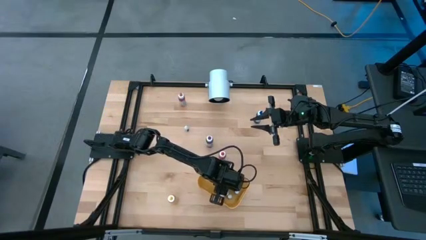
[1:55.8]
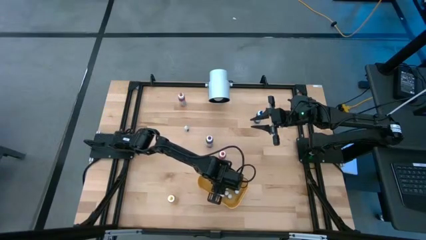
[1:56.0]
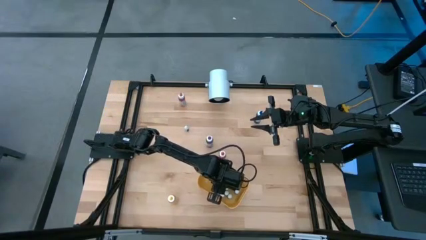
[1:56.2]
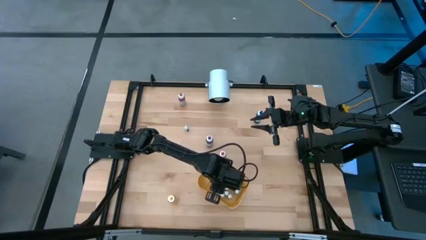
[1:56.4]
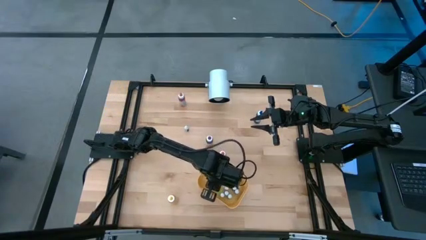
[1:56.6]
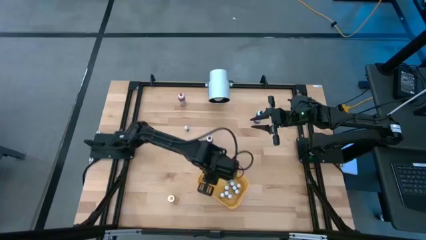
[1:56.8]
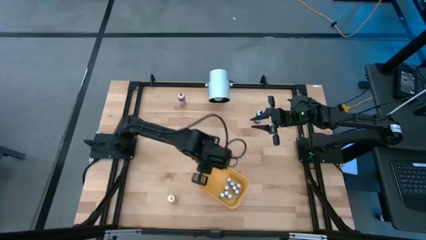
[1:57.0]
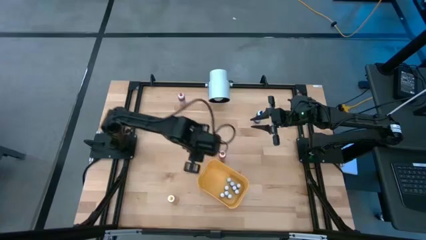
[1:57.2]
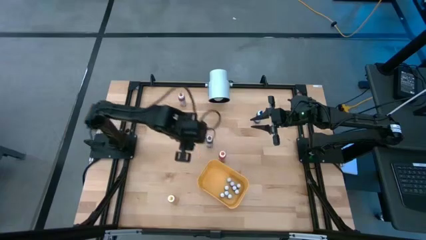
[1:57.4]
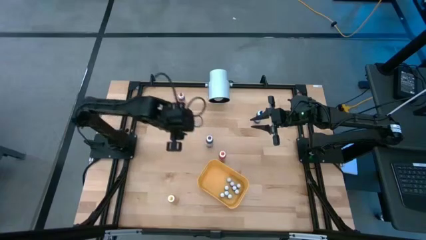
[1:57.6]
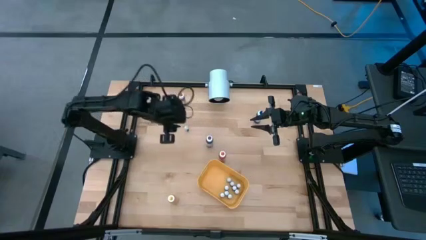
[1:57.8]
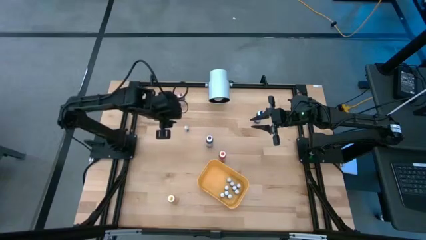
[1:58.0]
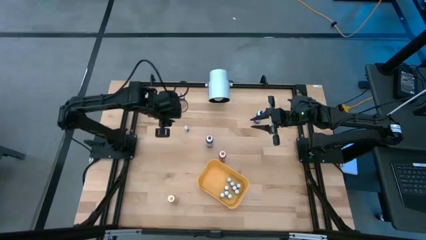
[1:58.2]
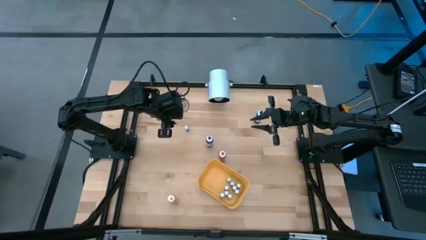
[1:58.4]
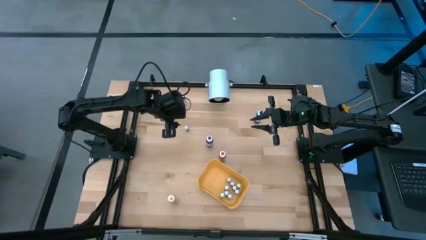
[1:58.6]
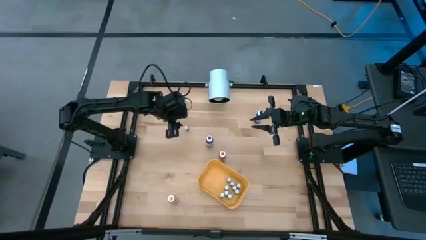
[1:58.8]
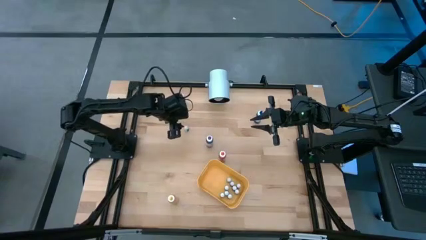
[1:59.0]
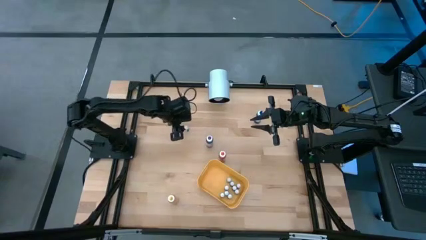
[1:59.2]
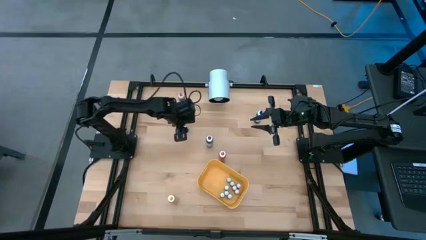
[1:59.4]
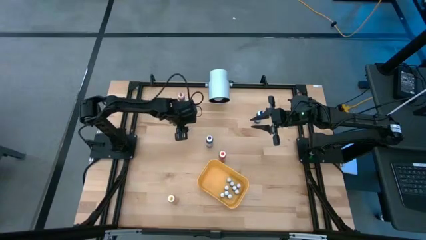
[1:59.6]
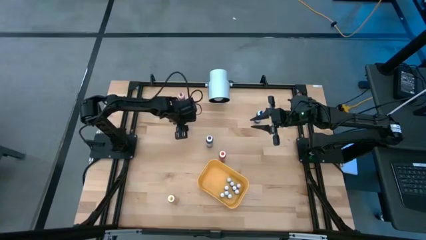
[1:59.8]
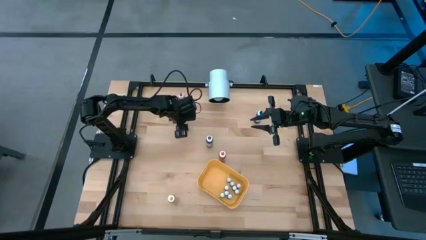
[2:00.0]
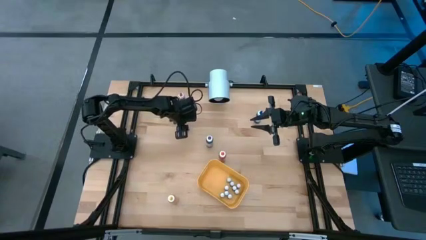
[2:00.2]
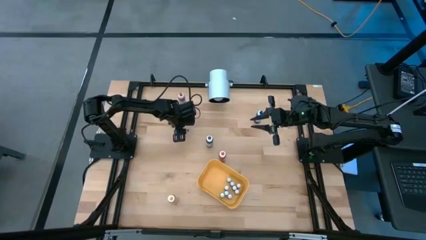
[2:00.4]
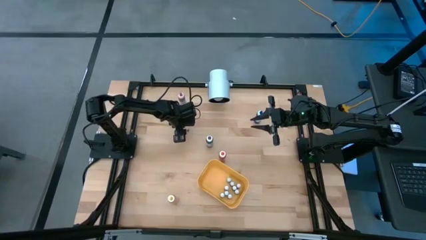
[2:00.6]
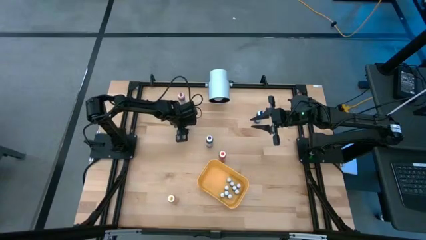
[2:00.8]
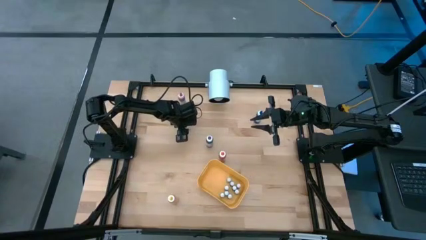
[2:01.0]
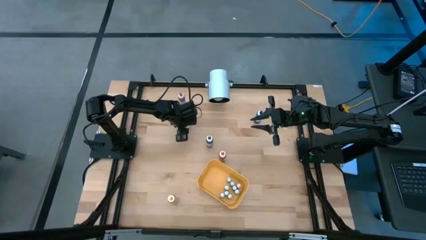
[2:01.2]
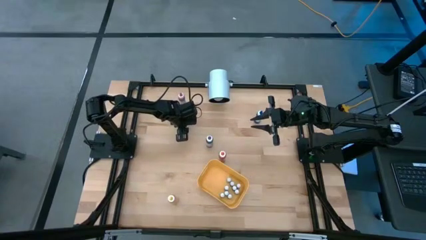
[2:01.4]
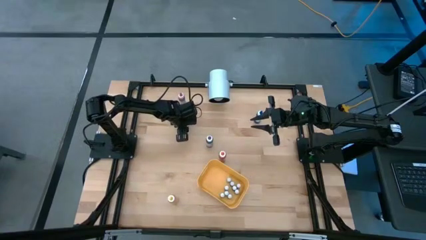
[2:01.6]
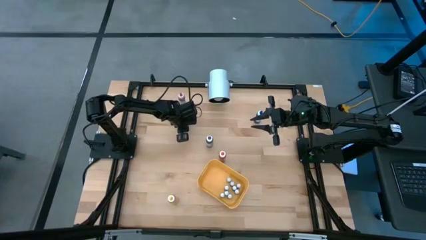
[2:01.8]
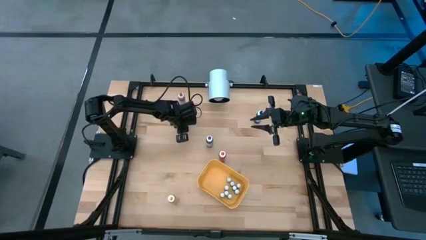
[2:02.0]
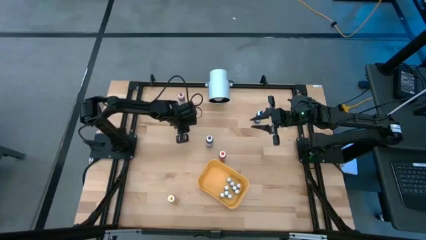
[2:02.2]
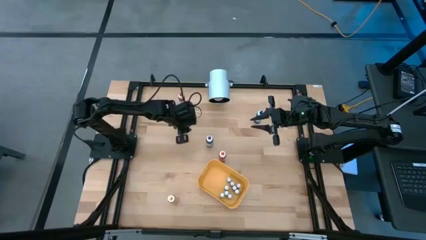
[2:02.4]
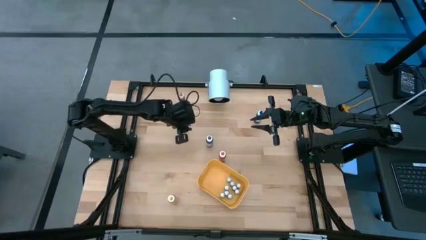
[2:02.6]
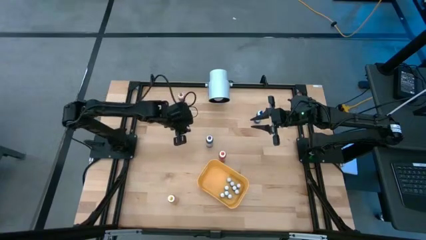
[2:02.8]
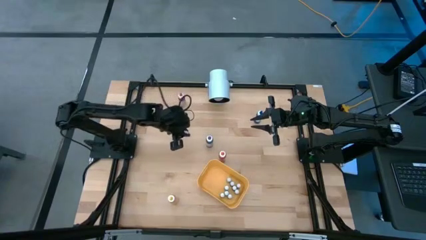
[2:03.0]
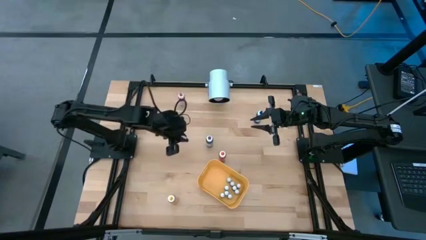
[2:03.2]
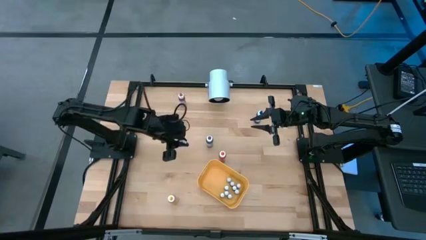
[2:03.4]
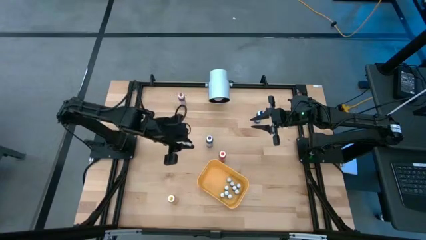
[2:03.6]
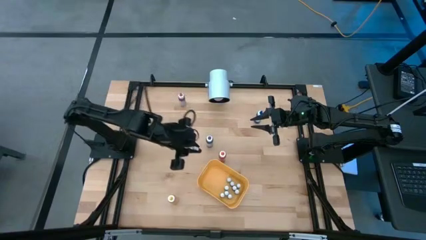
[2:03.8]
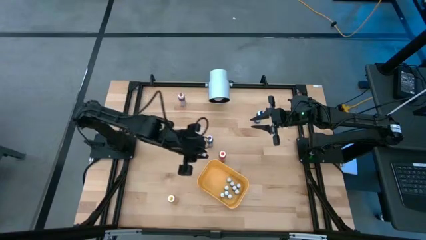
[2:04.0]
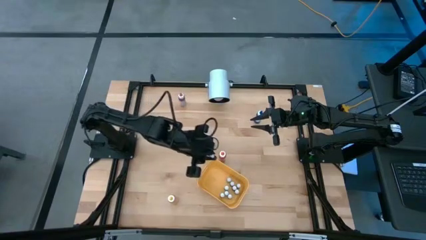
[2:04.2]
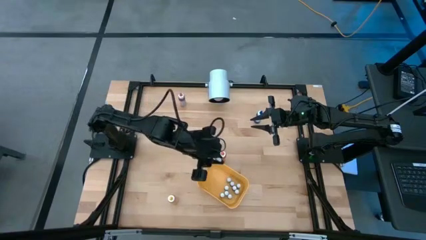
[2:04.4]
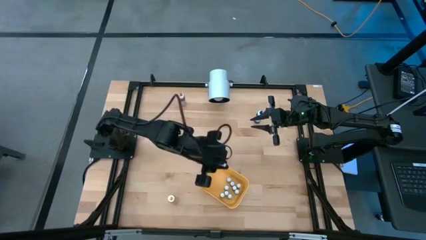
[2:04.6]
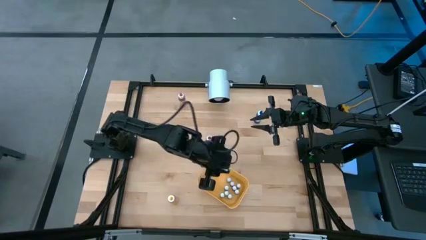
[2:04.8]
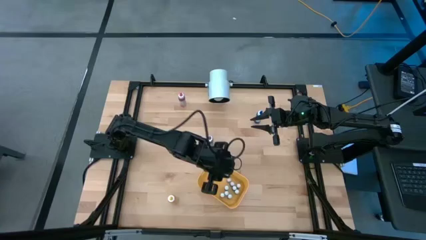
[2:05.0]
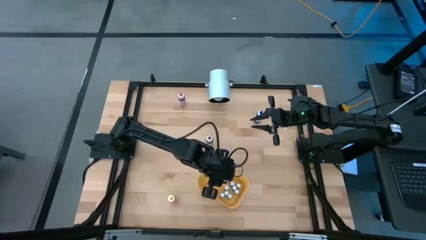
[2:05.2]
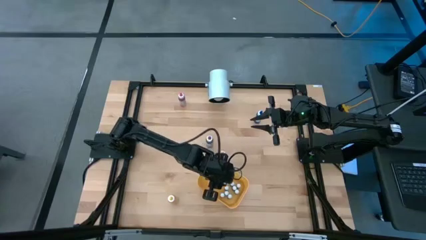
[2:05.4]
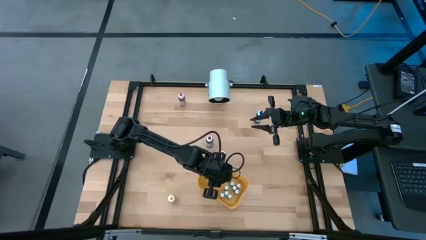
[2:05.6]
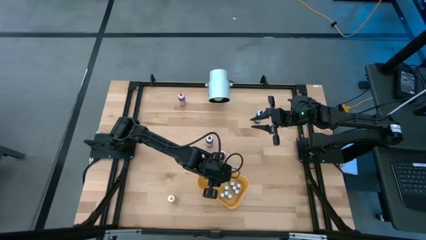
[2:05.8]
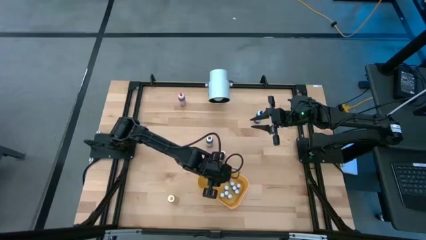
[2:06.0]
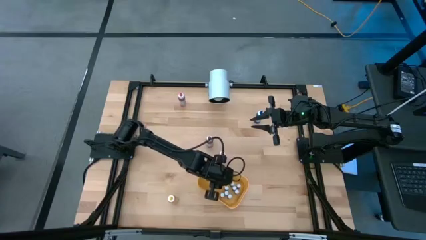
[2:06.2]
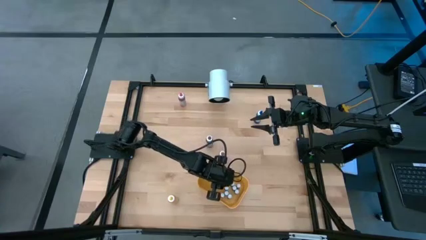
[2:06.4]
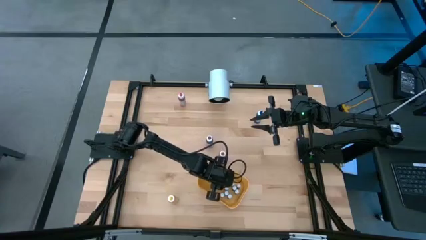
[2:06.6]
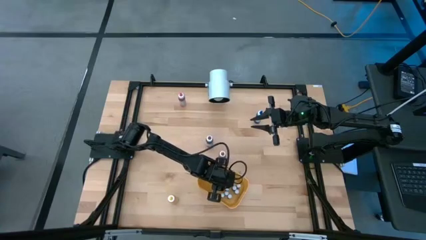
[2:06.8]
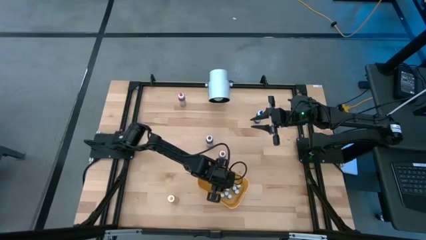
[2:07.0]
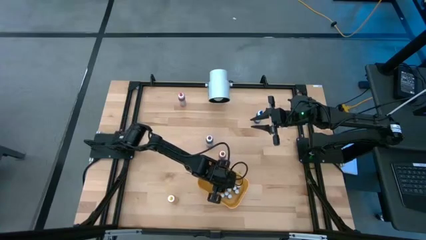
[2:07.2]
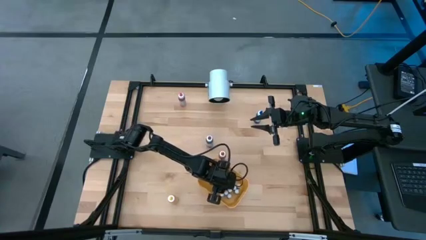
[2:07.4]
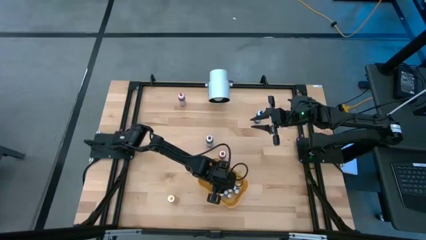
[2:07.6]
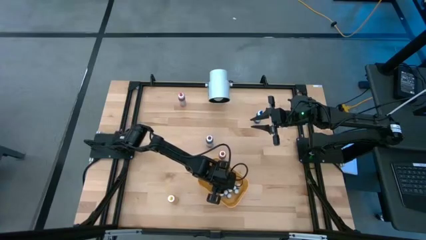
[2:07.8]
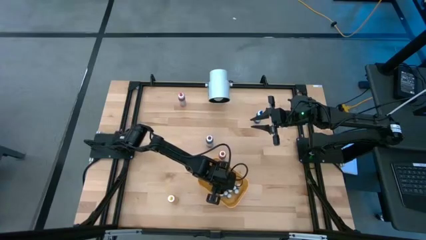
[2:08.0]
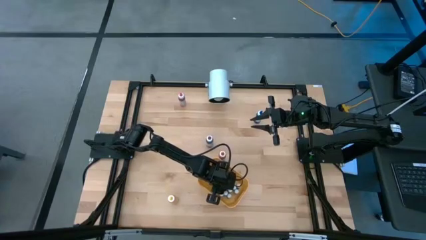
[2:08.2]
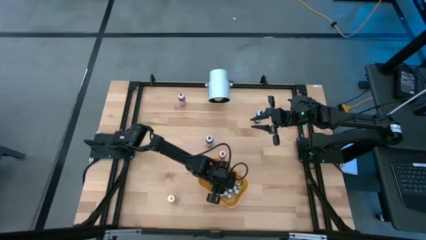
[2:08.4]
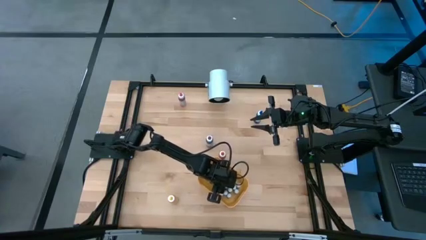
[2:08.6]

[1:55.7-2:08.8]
Task: Pick & Place food coloring
Put the small green food coloring bottle into the yellow container
